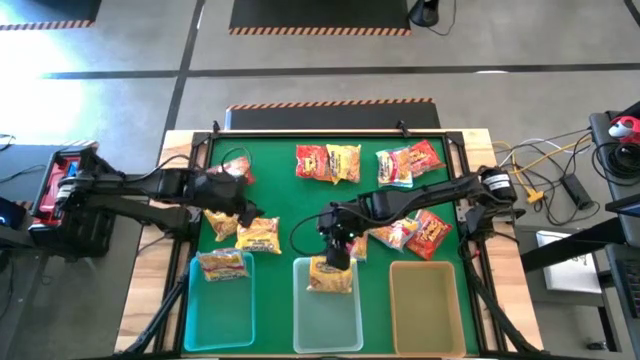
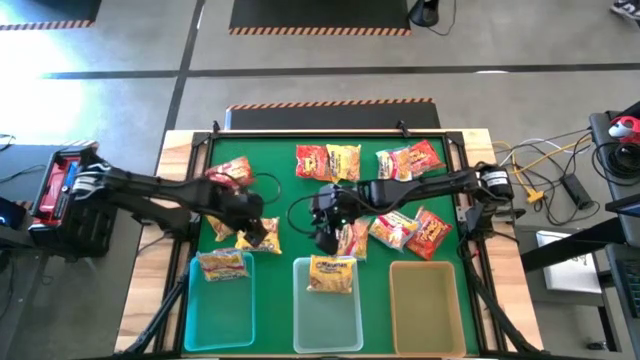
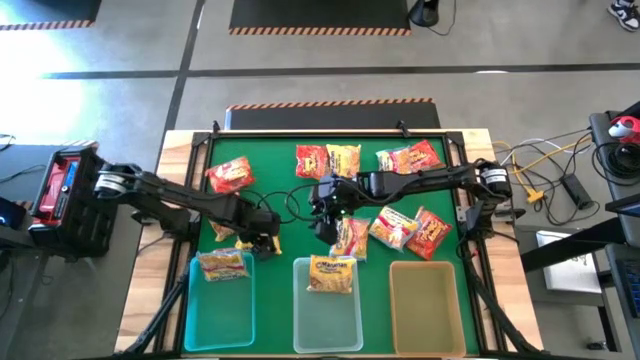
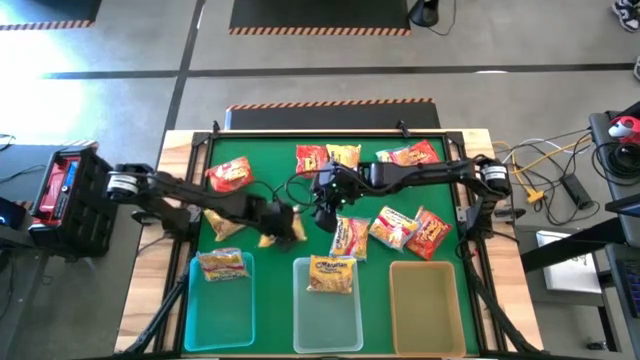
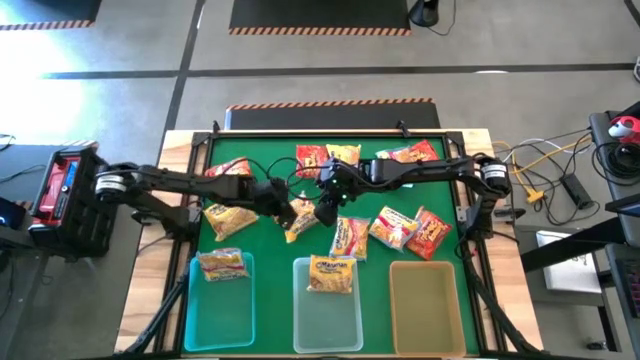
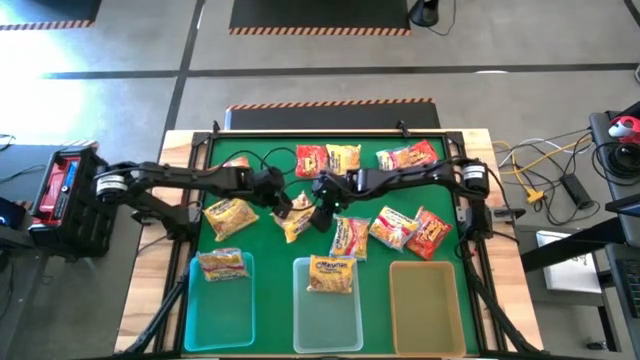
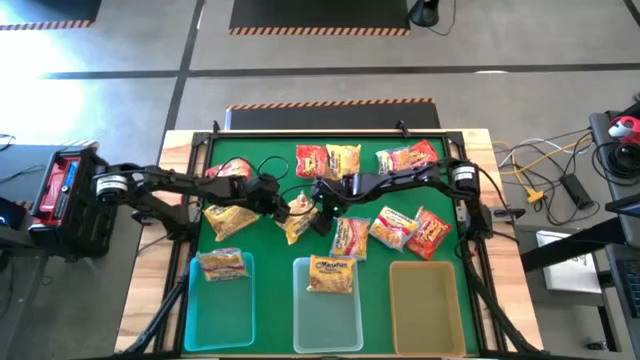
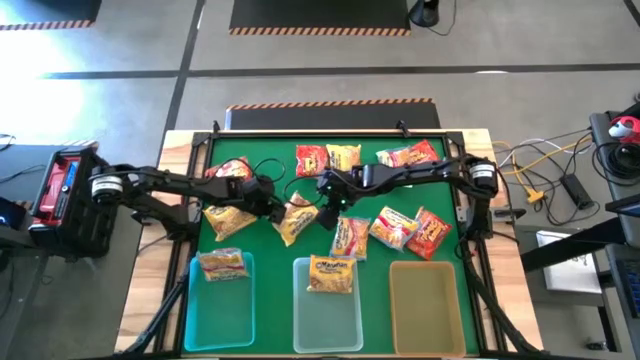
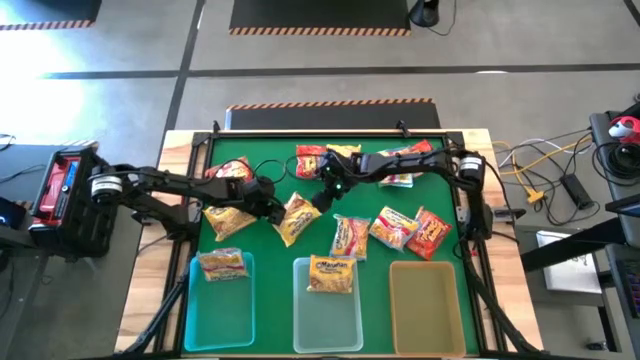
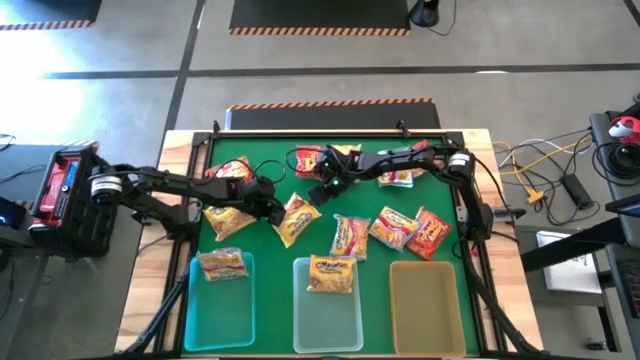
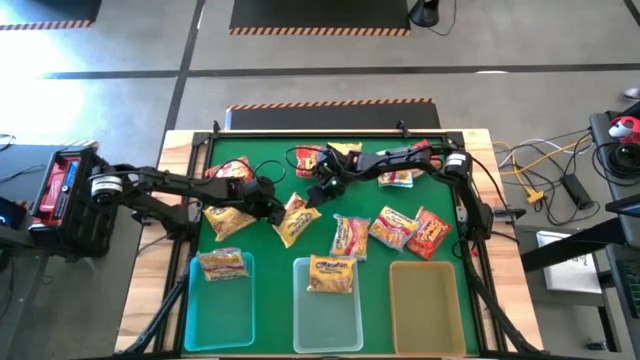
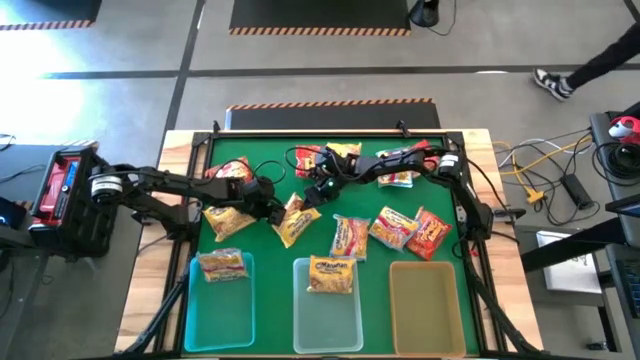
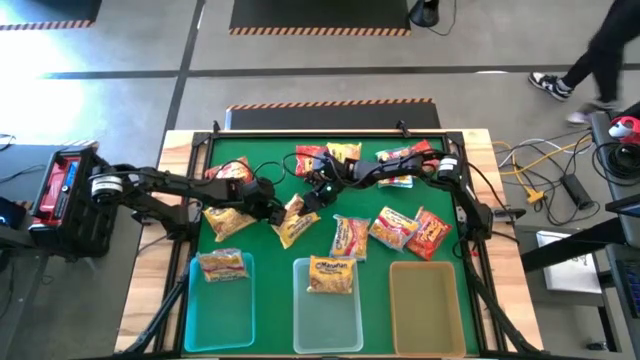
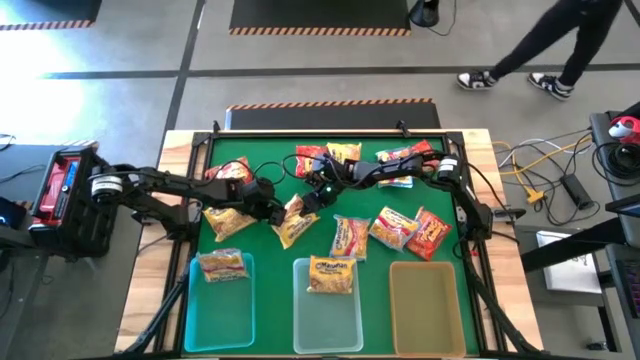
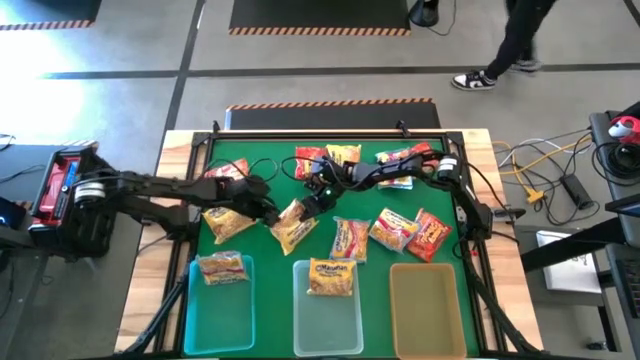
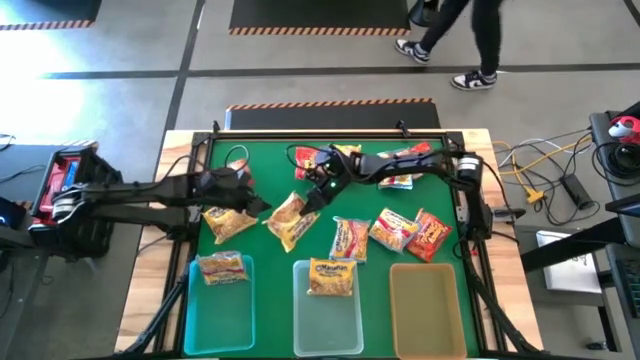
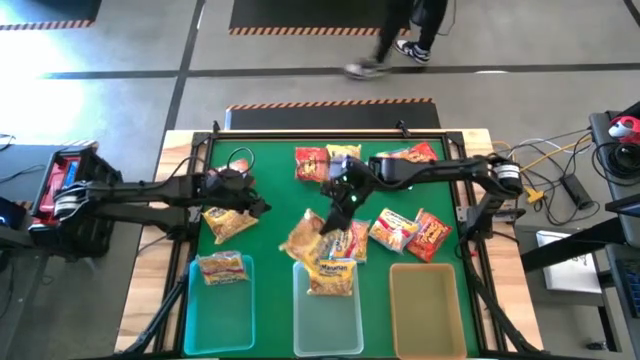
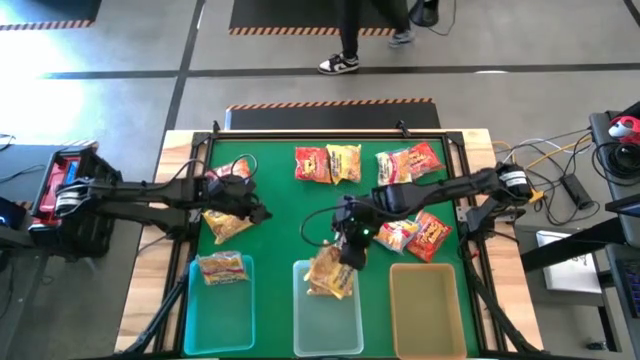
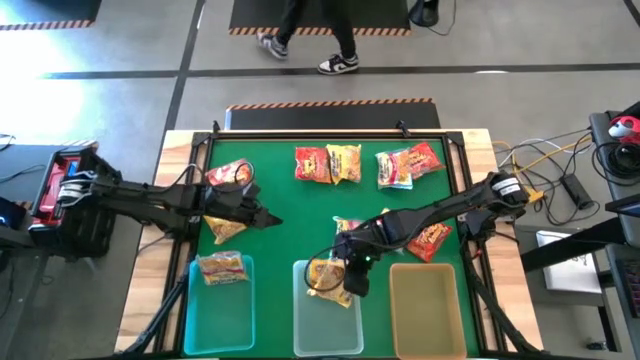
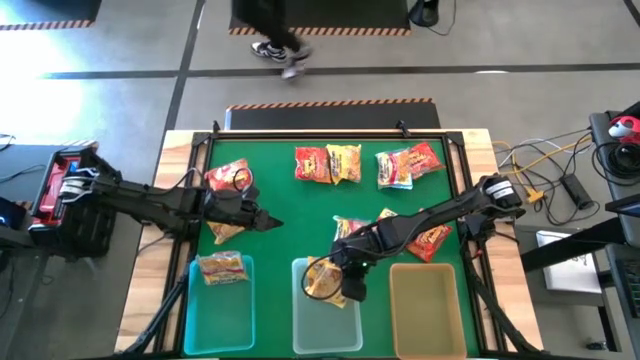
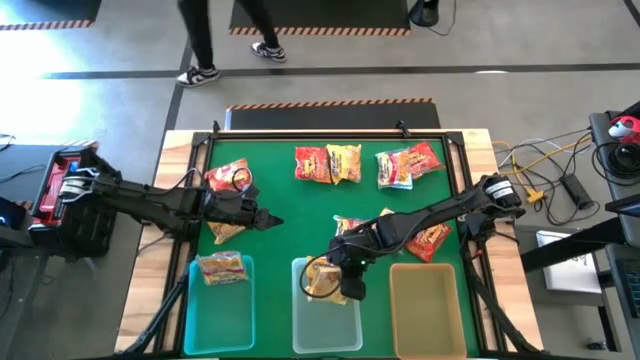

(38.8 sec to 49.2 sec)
Task: Sort Maruchan noodles
Put the yellow noodle pack into the transparent bin

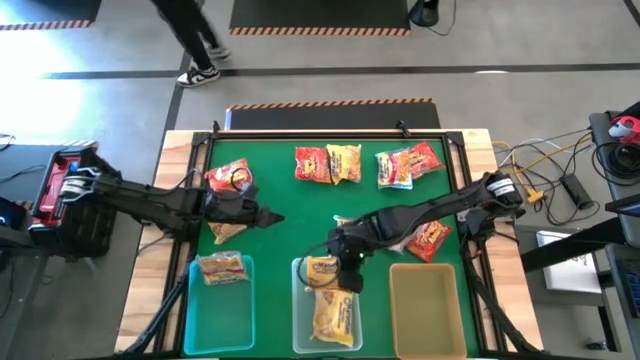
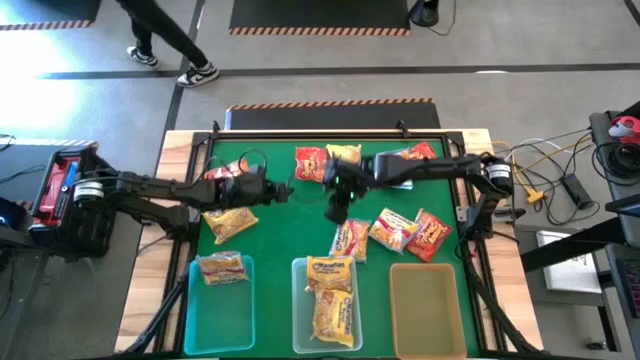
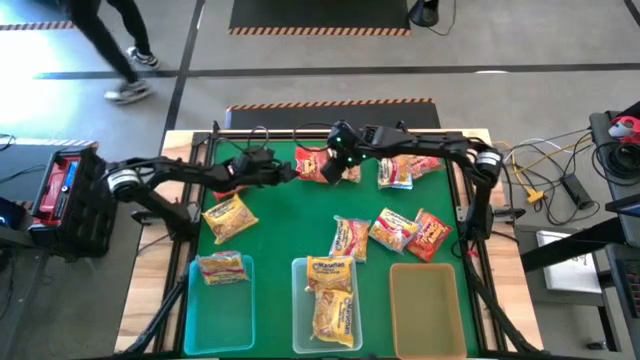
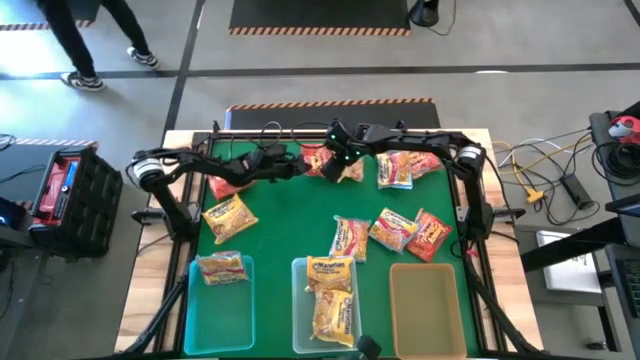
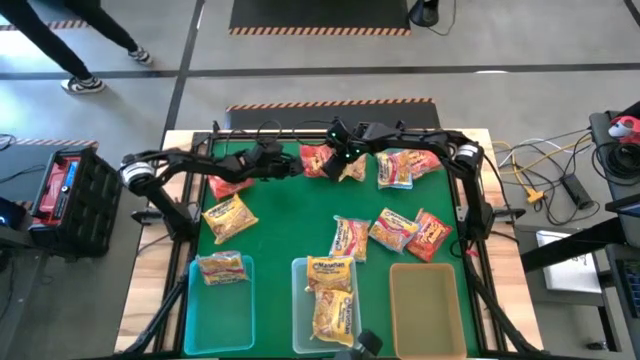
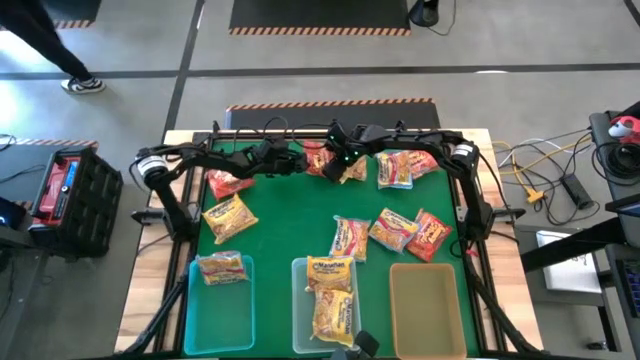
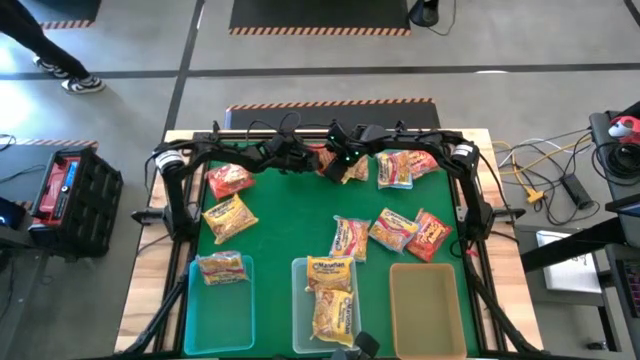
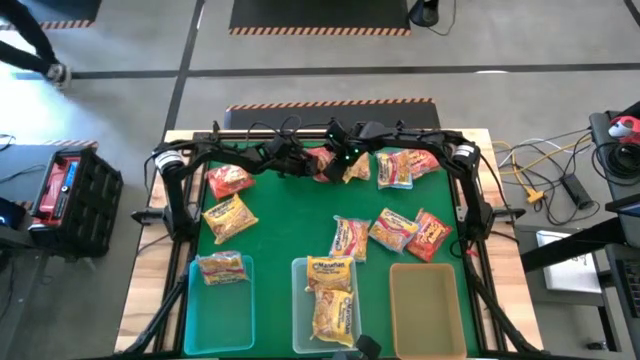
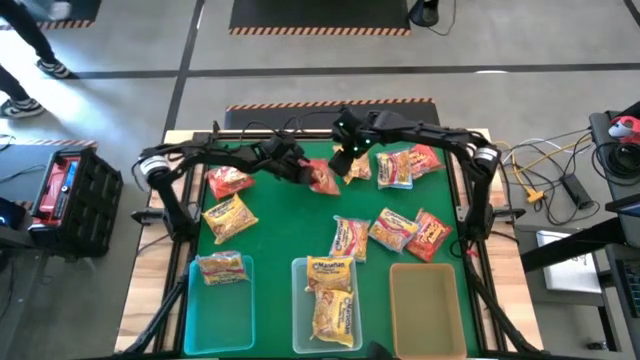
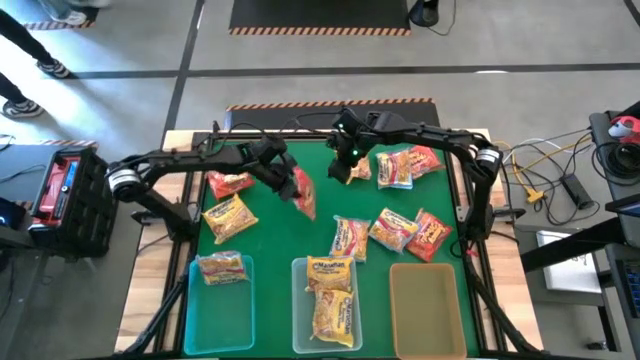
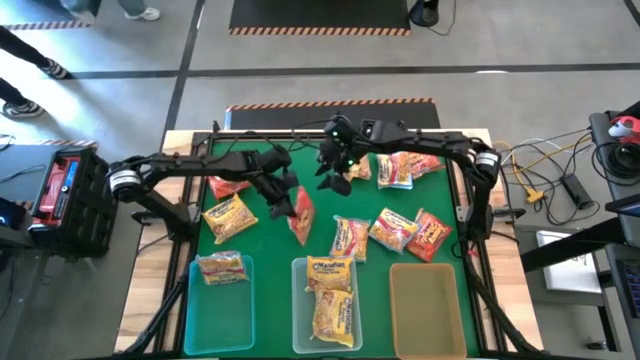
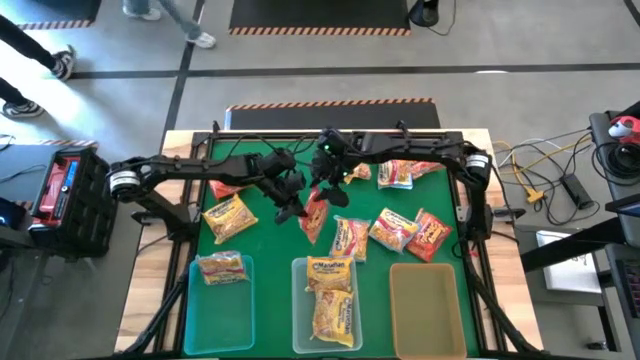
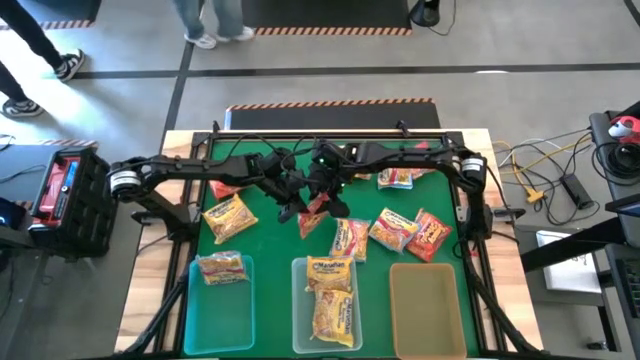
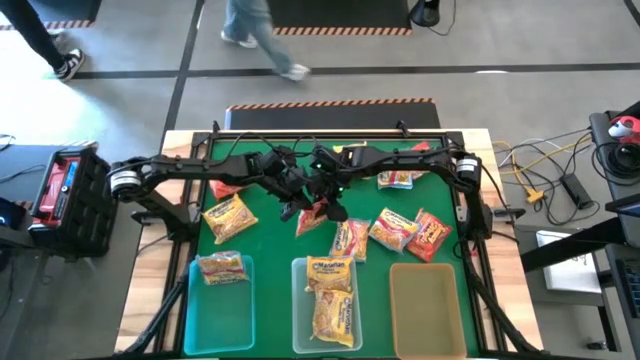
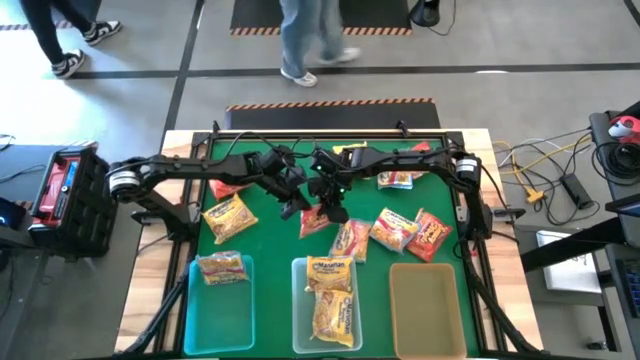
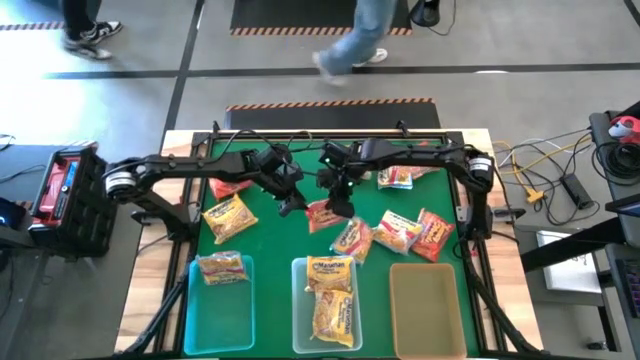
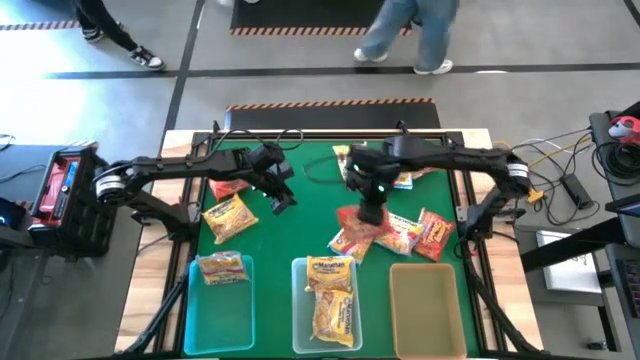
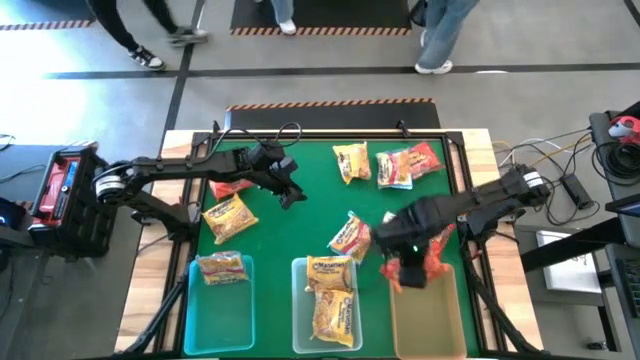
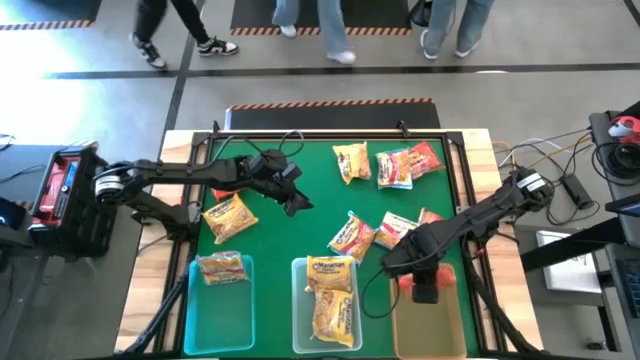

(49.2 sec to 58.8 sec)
Put the orange noodle pack into the orange bin
